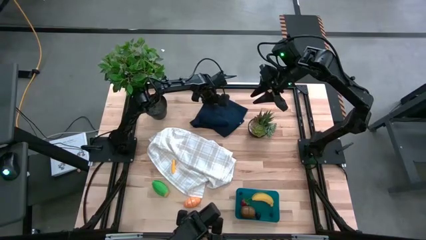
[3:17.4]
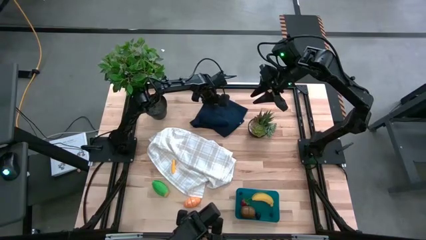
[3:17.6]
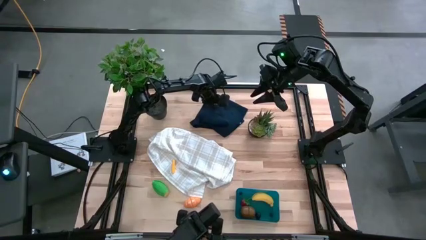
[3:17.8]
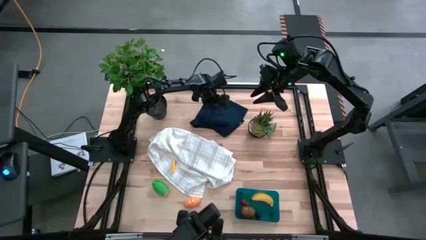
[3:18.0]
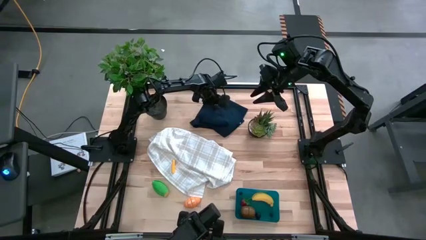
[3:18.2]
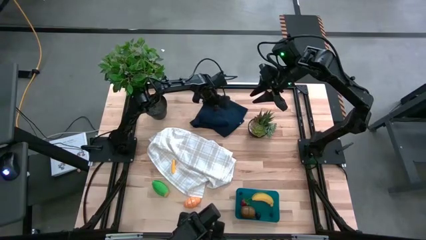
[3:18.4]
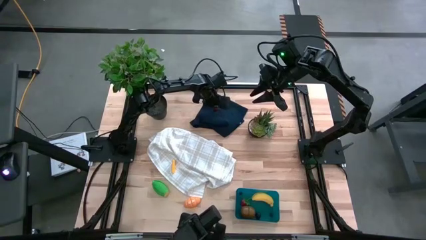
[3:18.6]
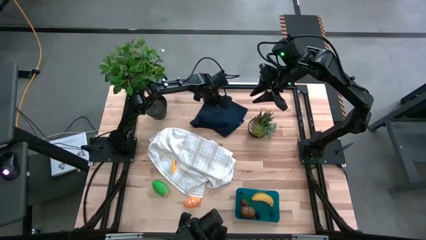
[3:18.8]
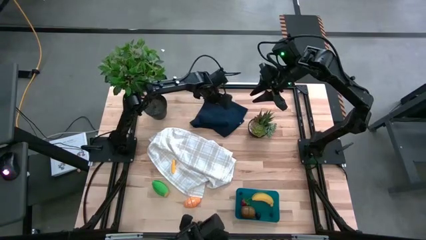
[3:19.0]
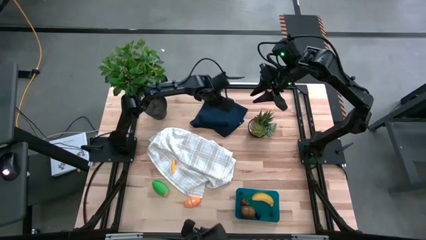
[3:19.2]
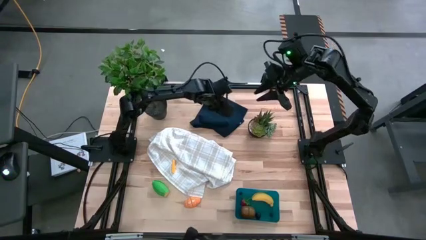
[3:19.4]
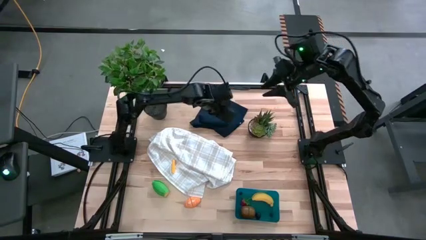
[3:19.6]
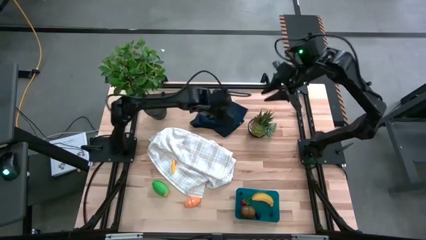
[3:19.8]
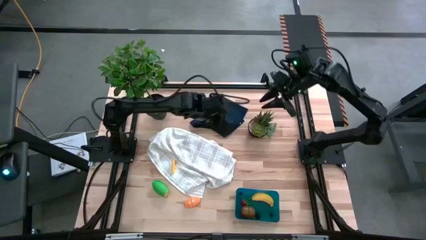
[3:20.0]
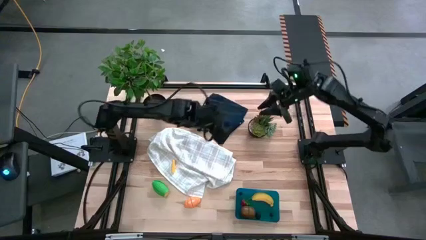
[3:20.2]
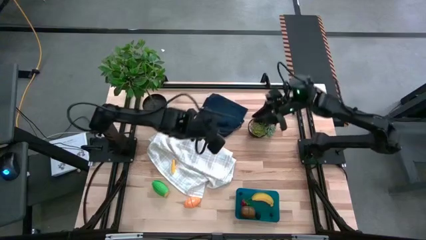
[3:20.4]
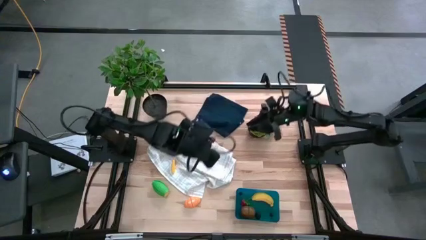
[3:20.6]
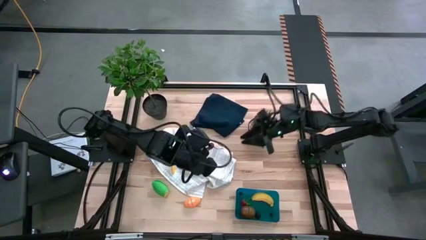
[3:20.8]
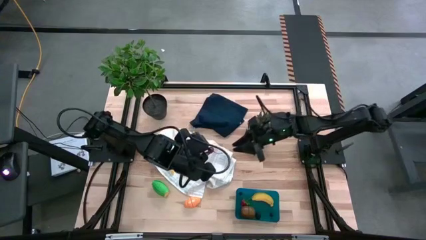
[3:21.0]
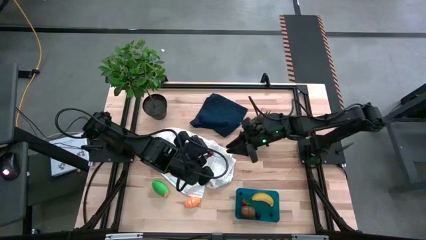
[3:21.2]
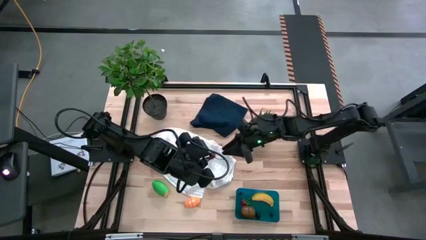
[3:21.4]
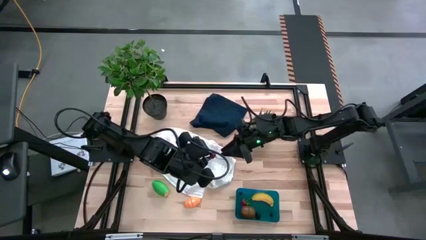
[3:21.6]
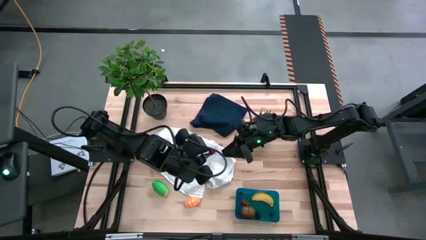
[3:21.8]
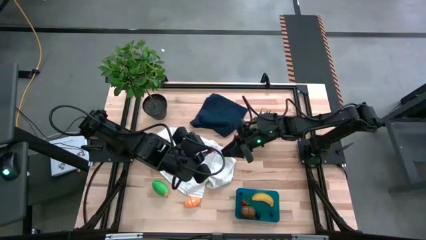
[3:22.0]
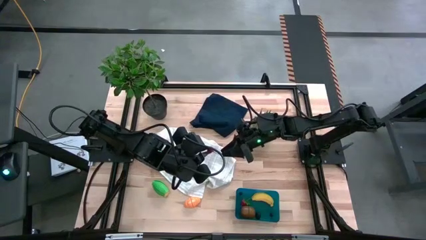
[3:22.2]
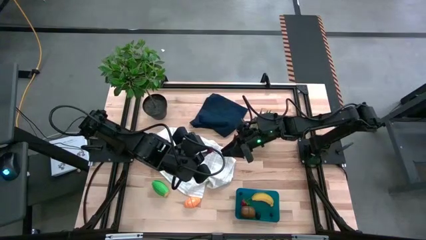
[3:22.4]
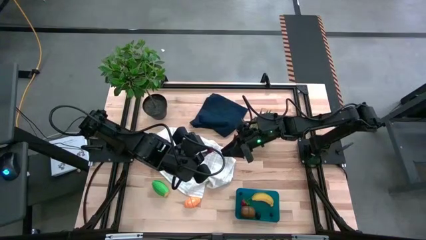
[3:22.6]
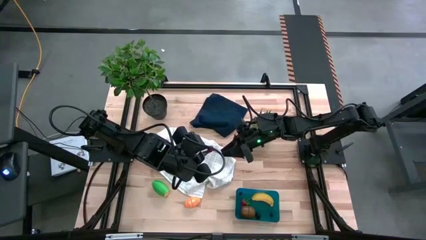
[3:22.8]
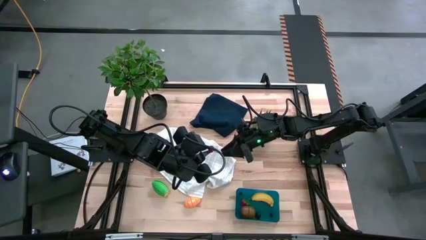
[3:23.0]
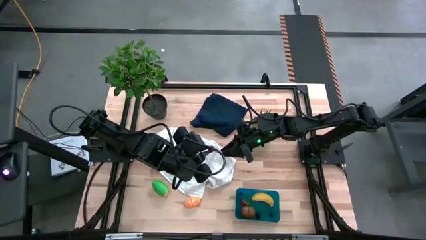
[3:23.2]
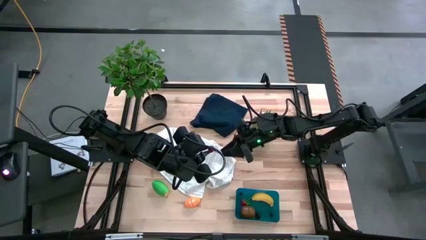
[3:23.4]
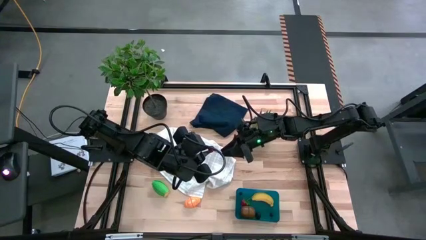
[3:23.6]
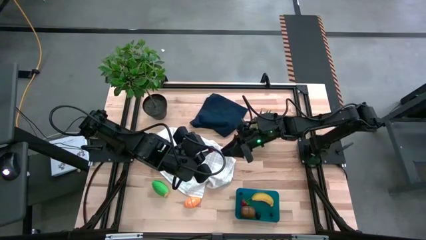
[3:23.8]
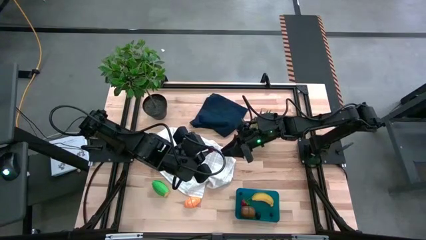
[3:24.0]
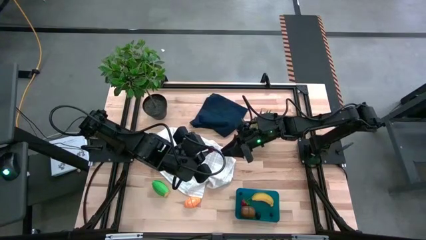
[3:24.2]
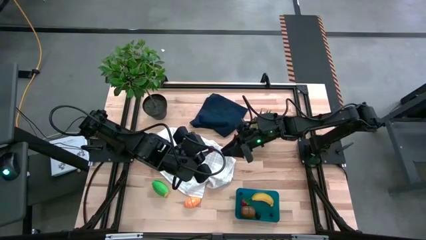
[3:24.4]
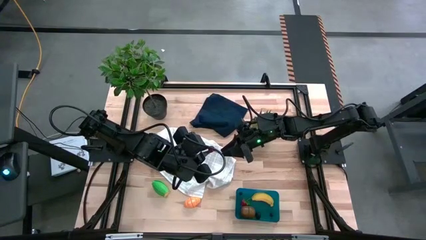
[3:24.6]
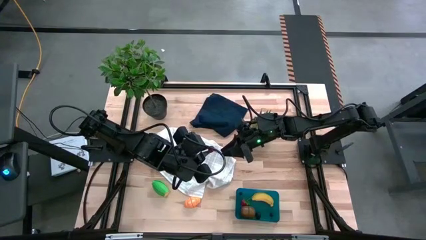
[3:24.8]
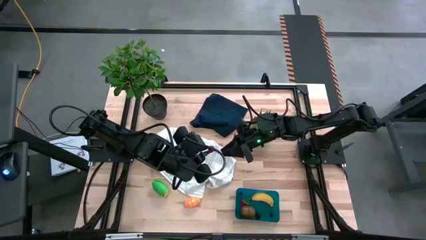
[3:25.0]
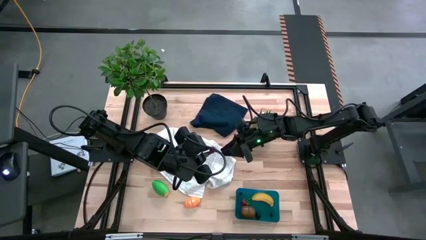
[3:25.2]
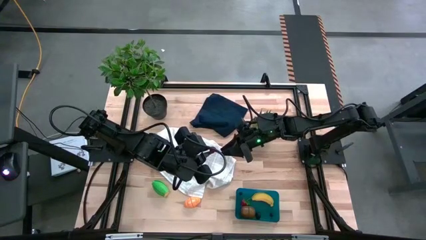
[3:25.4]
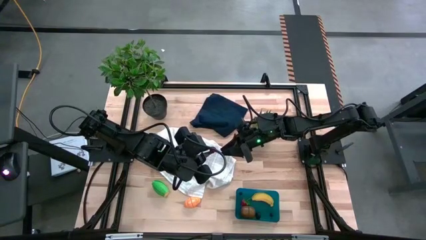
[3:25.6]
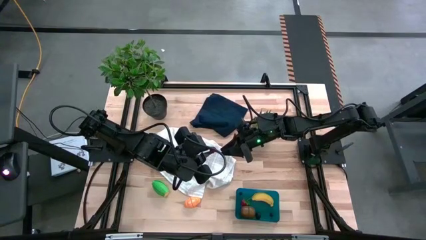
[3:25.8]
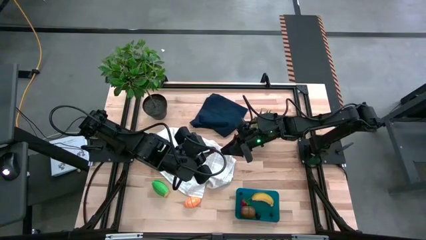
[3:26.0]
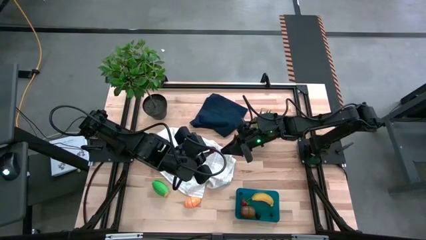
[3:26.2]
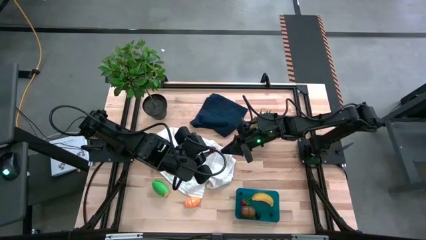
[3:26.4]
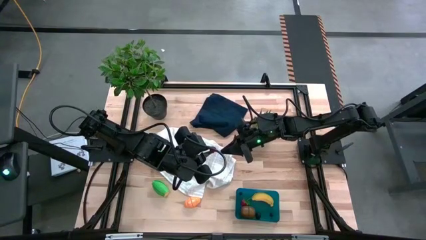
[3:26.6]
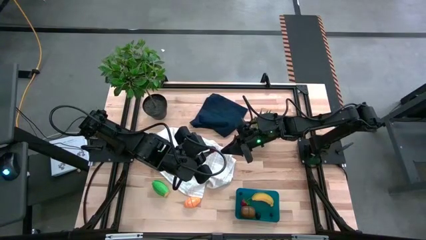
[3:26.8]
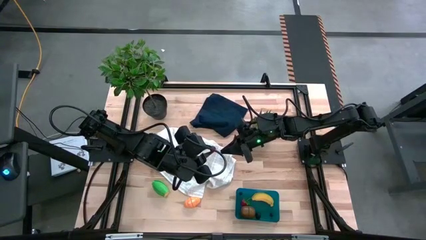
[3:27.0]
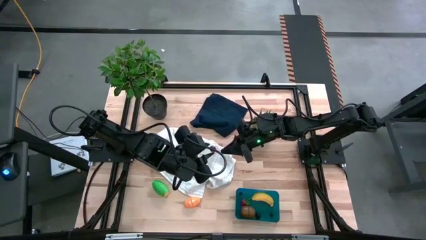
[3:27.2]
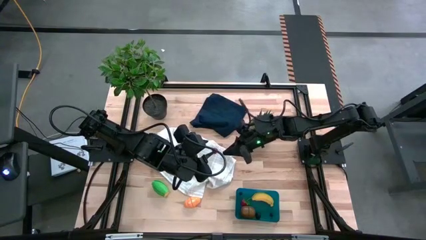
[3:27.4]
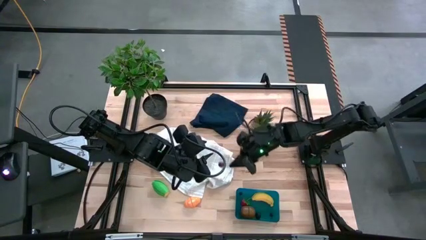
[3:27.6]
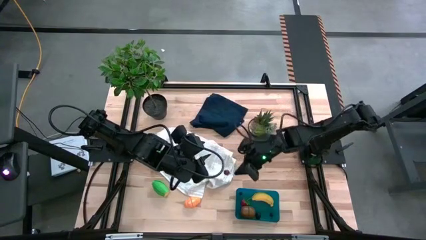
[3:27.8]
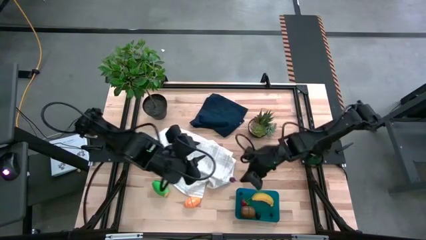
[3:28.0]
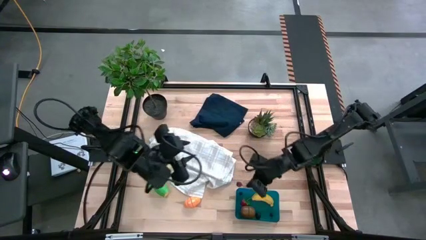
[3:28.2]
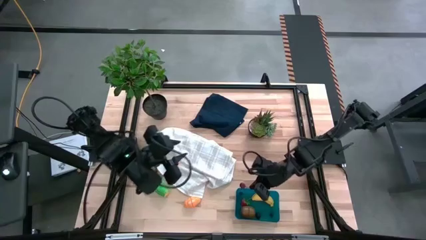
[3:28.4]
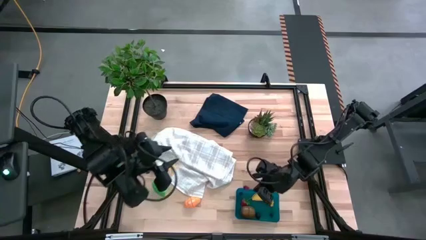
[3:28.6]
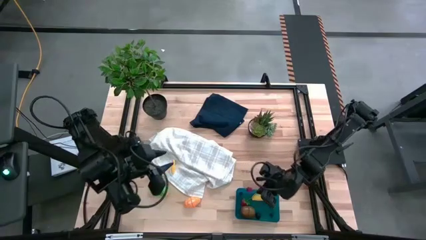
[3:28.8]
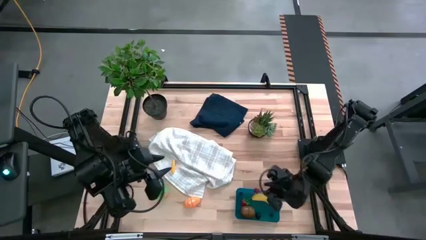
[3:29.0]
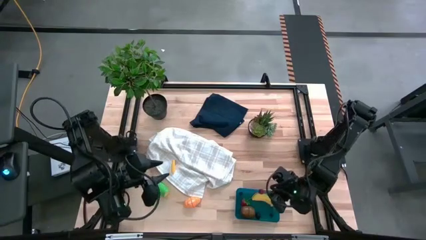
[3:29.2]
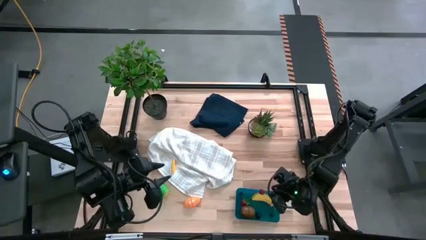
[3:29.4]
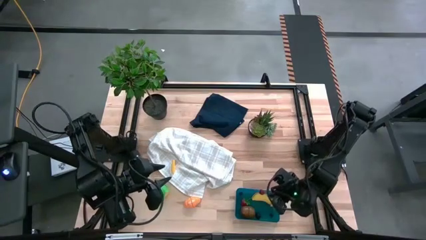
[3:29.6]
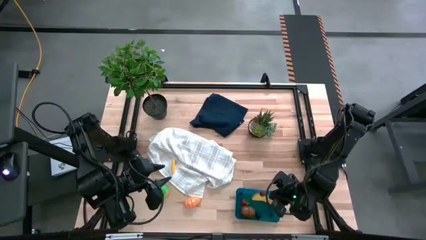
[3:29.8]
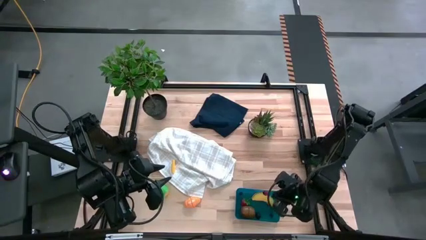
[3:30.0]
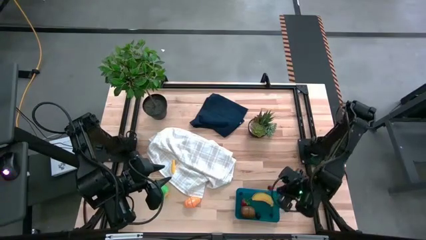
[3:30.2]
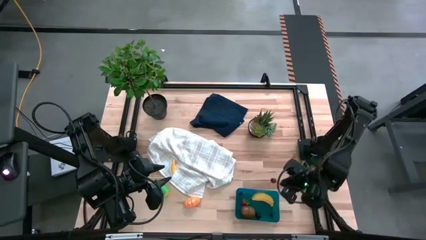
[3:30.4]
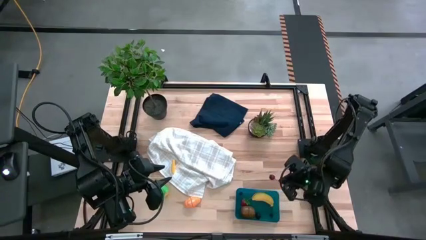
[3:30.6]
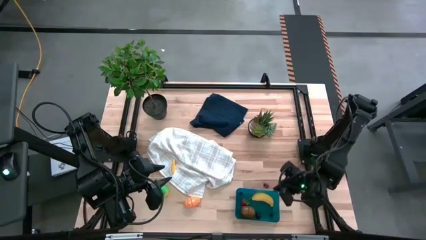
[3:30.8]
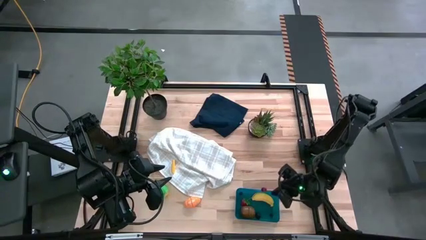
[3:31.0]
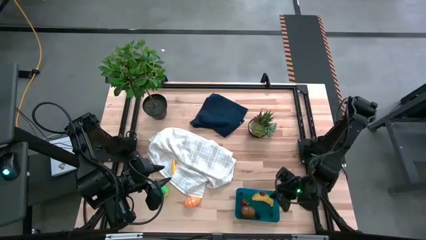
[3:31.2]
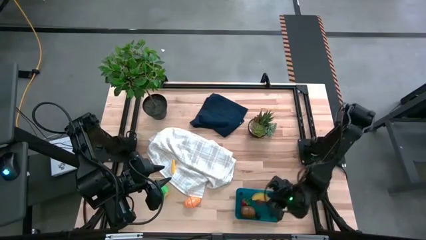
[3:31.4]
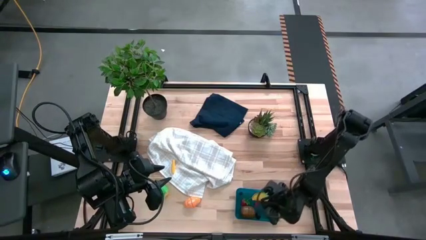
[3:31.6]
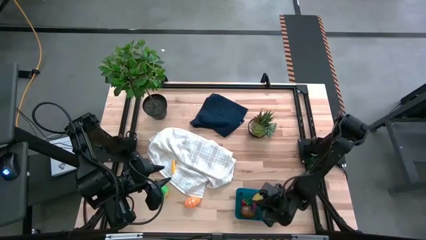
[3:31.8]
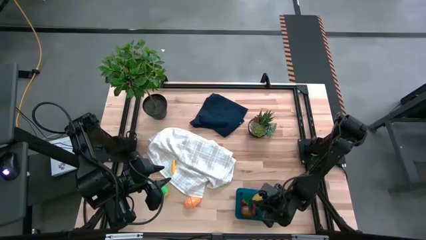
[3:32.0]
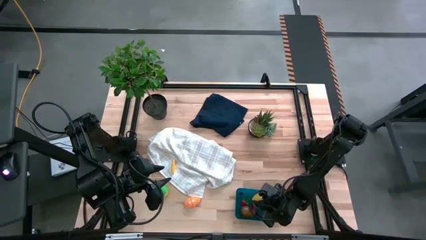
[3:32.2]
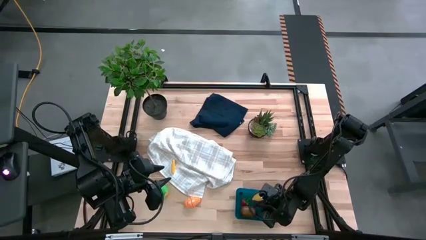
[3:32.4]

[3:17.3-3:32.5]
Task: Pick and placing Produce into tupperware
Put the cherry into the bin

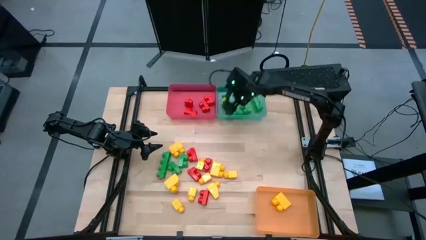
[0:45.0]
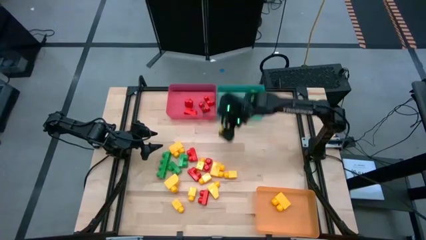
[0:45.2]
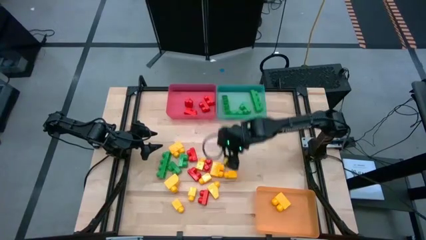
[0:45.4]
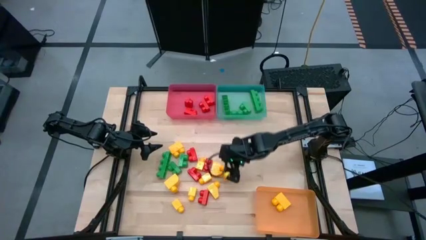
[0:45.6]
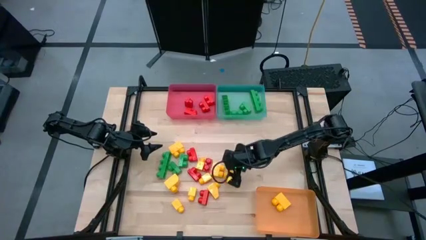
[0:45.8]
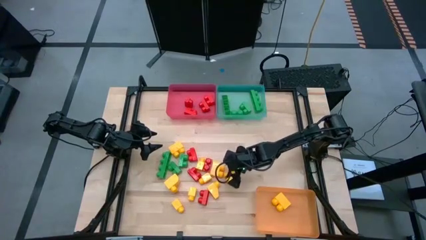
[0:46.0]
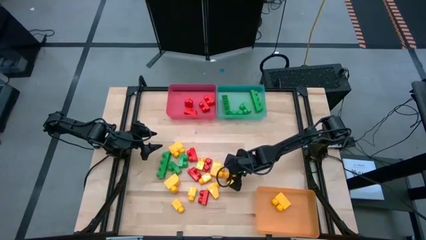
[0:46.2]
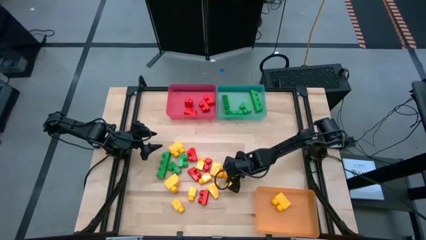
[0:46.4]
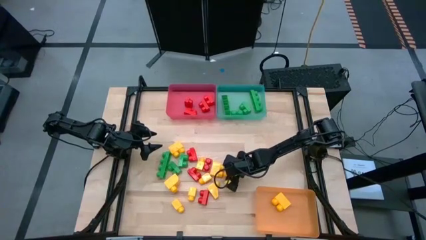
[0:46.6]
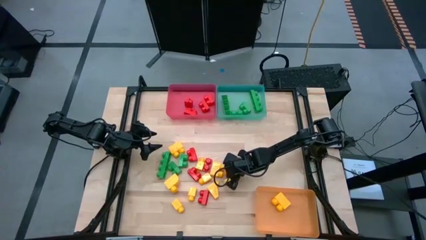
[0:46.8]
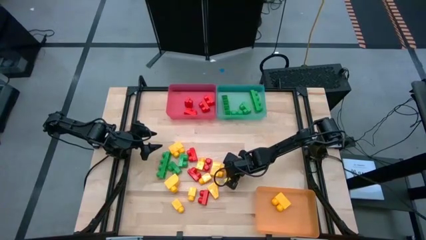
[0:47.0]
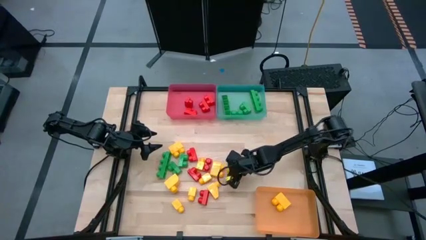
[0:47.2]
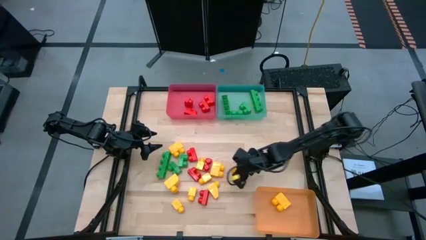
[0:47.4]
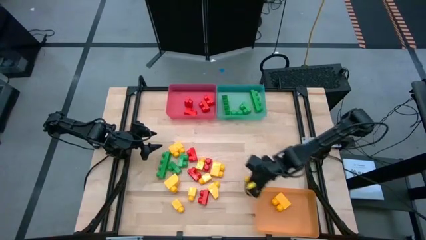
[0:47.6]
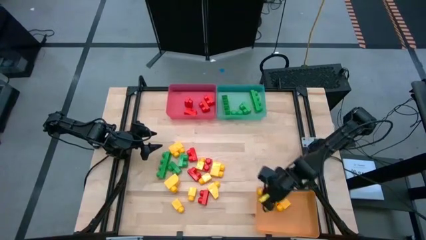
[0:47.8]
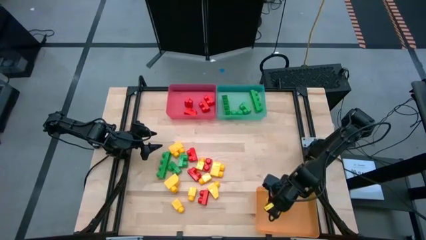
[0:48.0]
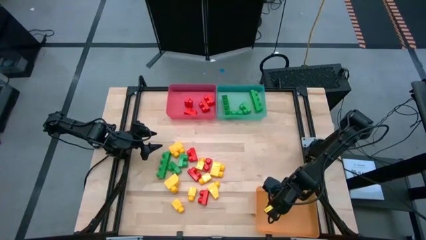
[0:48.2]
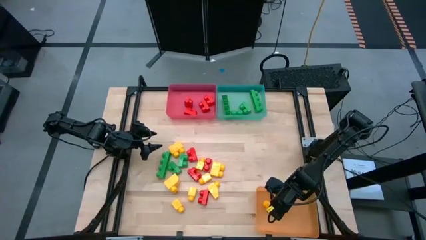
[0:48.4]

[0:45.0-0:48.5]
Task: Sort blocks
Put the yellow game piece into the yellow bin
